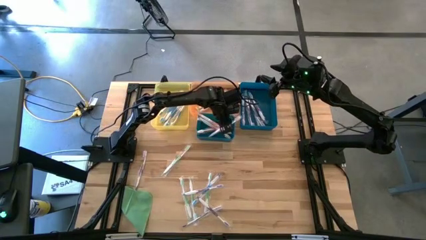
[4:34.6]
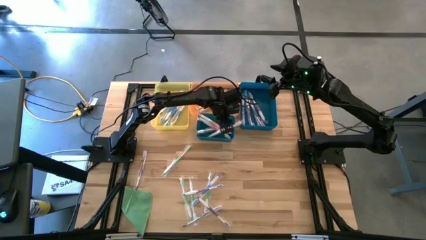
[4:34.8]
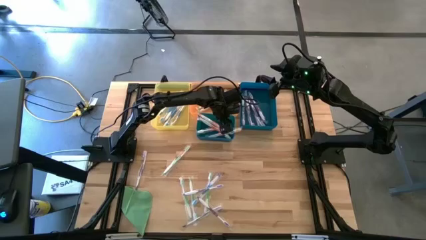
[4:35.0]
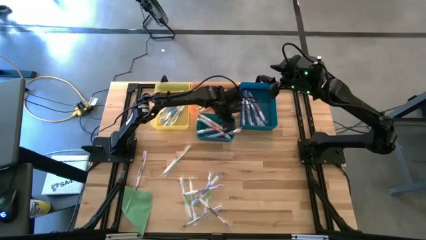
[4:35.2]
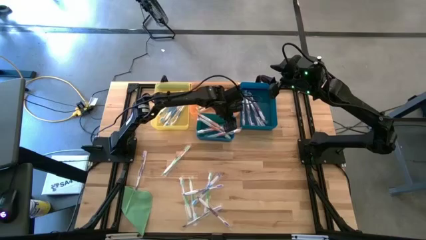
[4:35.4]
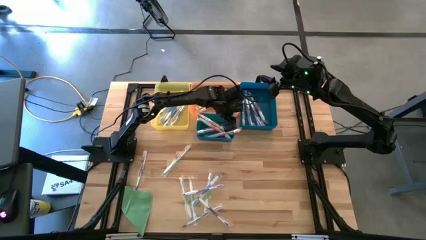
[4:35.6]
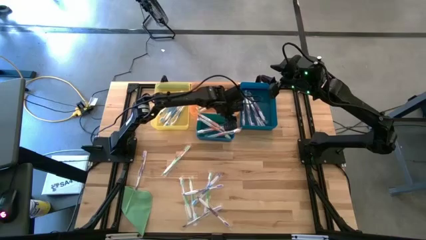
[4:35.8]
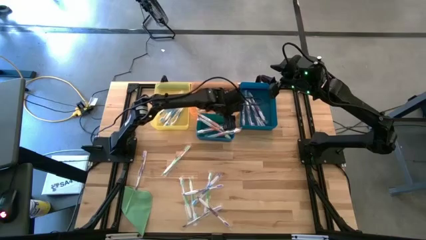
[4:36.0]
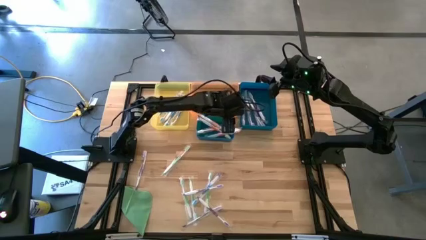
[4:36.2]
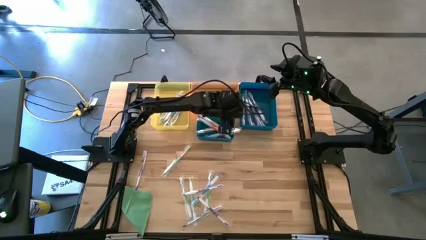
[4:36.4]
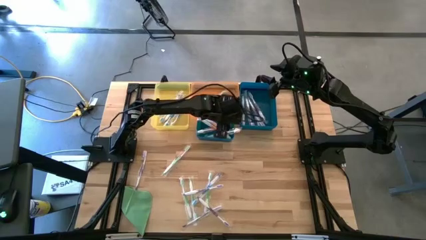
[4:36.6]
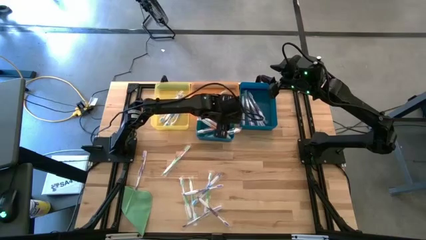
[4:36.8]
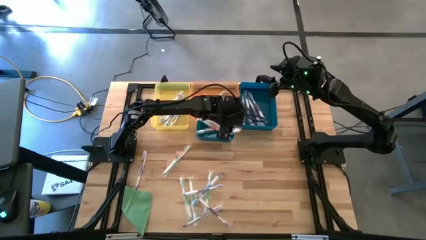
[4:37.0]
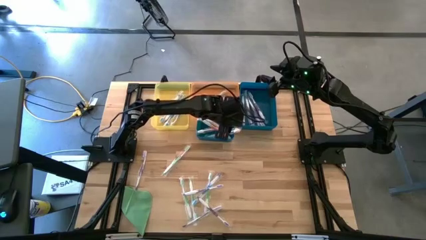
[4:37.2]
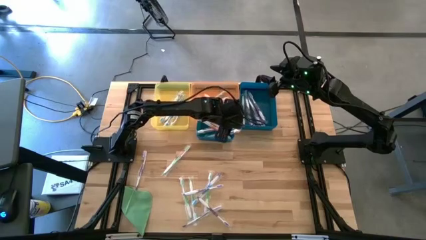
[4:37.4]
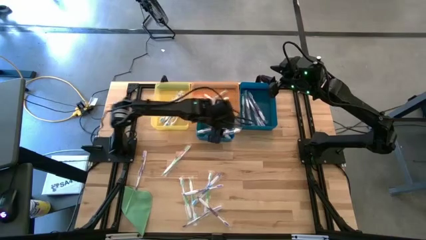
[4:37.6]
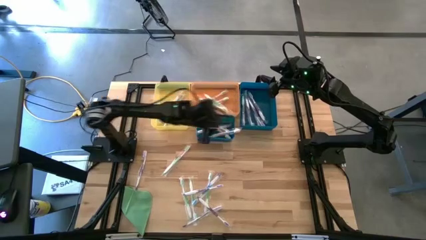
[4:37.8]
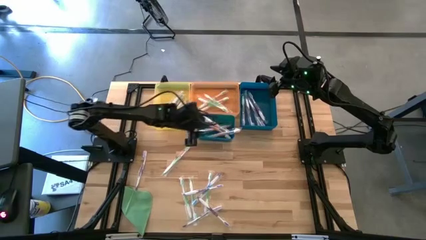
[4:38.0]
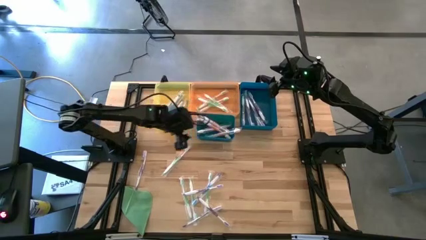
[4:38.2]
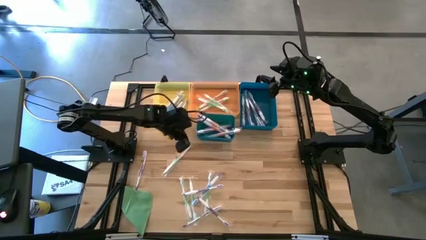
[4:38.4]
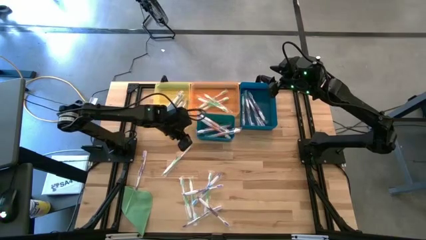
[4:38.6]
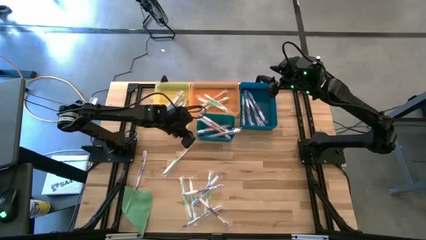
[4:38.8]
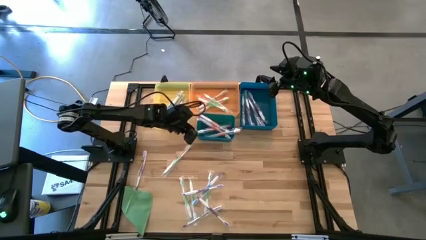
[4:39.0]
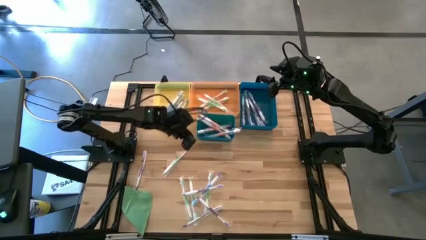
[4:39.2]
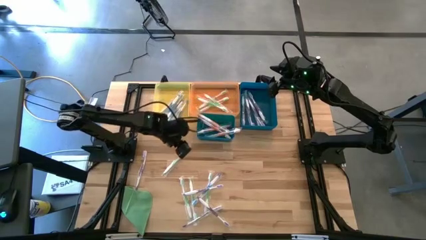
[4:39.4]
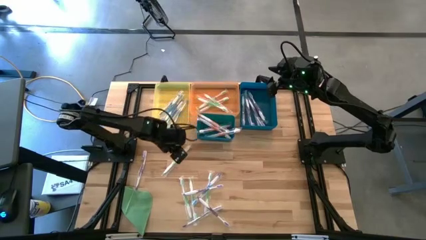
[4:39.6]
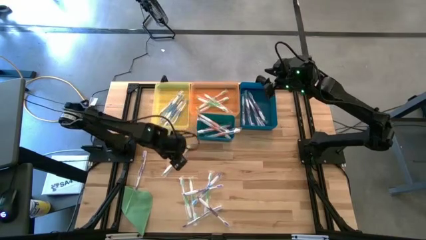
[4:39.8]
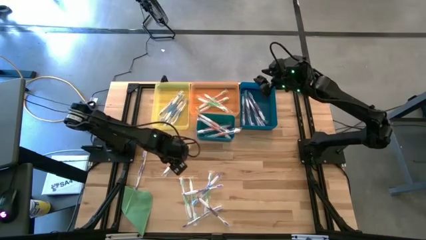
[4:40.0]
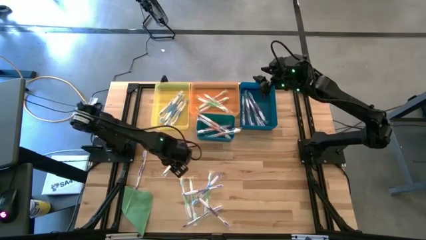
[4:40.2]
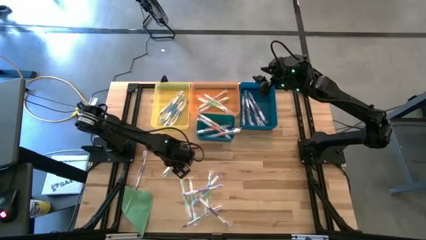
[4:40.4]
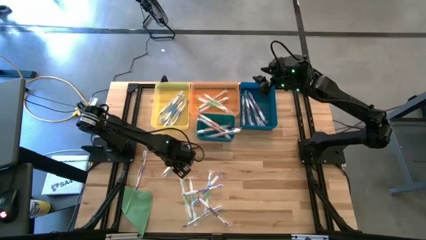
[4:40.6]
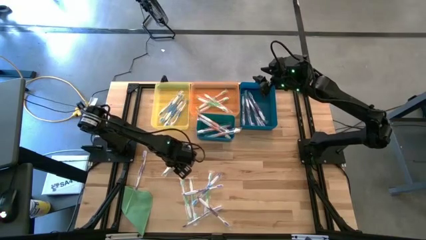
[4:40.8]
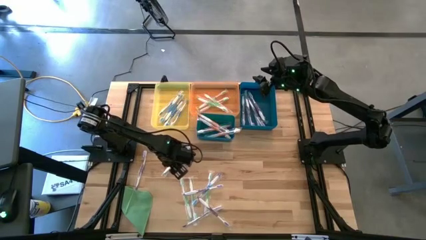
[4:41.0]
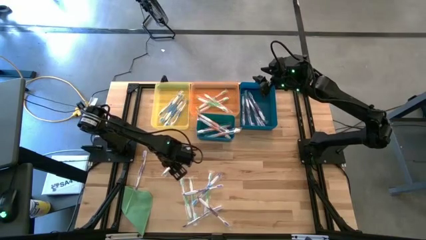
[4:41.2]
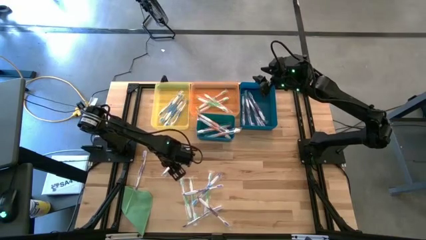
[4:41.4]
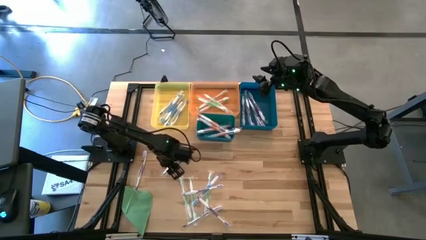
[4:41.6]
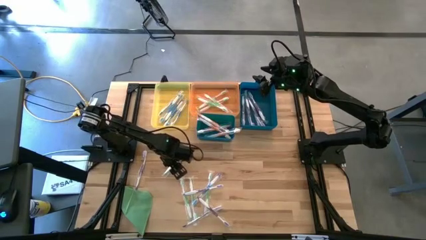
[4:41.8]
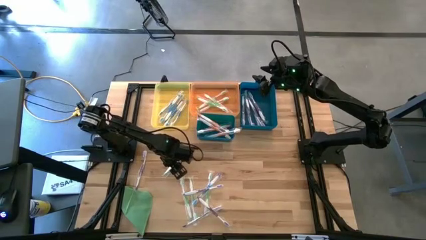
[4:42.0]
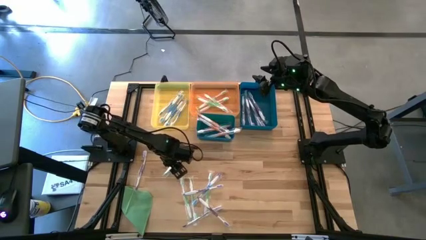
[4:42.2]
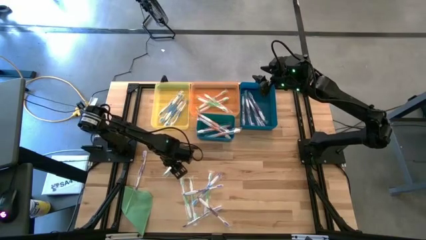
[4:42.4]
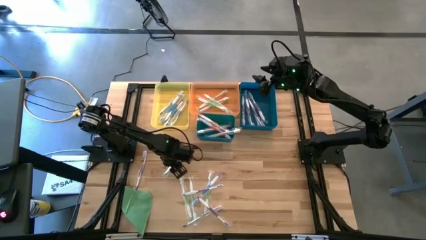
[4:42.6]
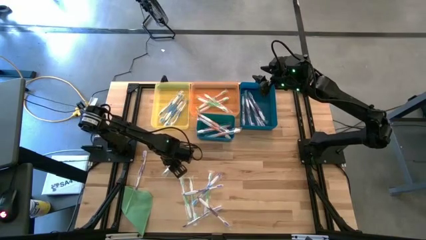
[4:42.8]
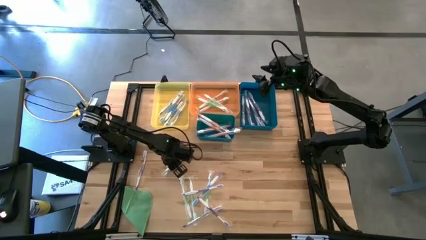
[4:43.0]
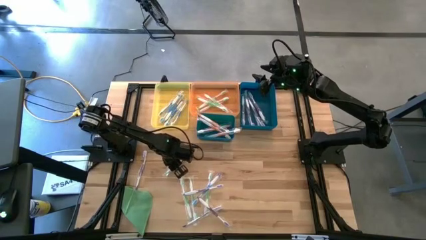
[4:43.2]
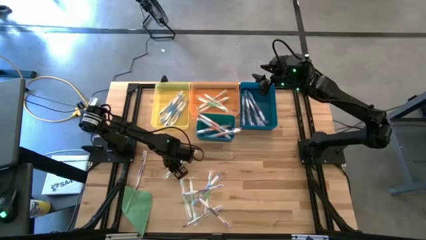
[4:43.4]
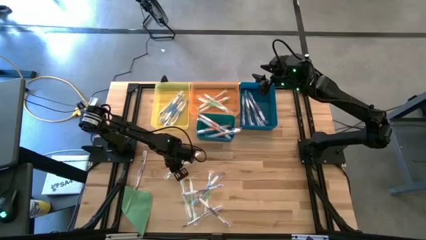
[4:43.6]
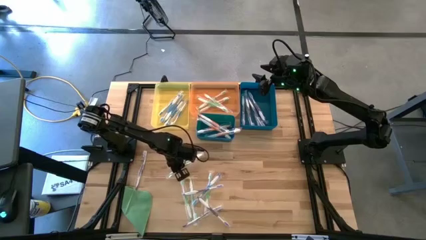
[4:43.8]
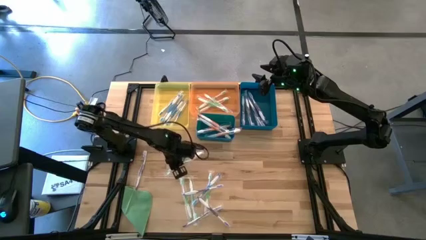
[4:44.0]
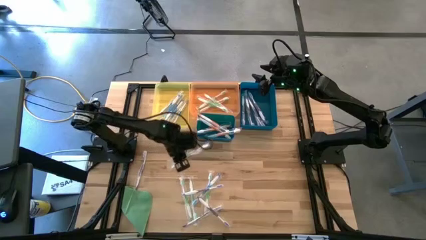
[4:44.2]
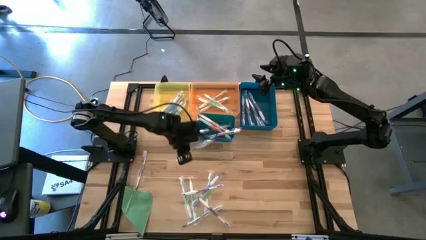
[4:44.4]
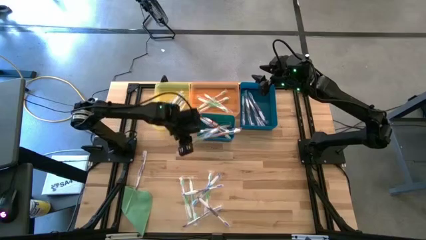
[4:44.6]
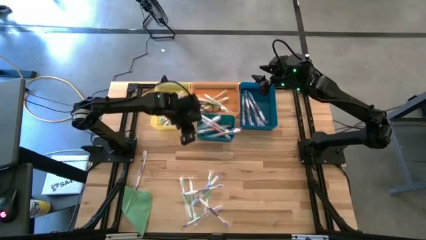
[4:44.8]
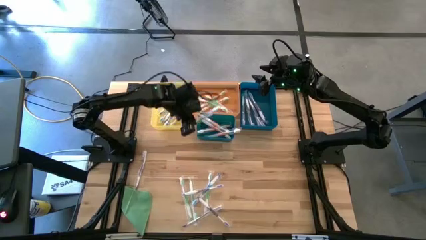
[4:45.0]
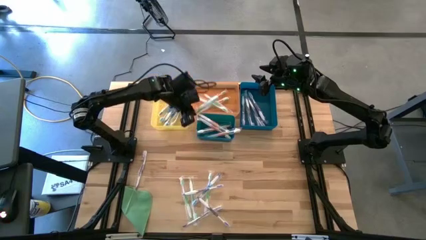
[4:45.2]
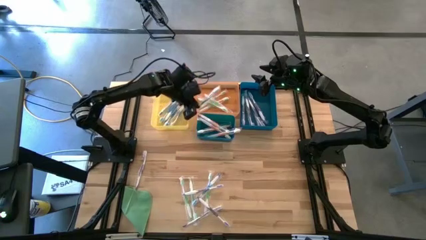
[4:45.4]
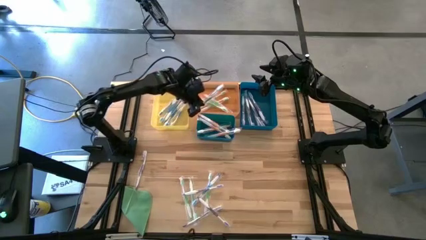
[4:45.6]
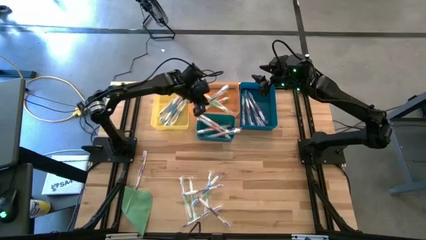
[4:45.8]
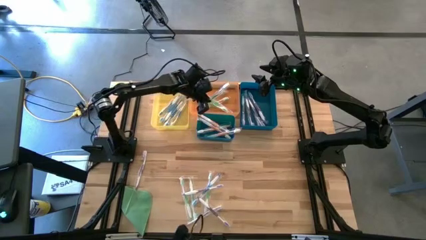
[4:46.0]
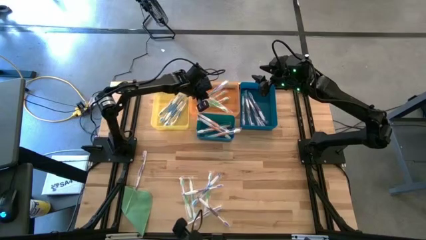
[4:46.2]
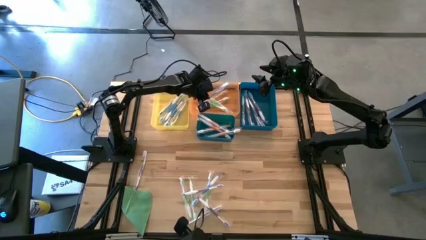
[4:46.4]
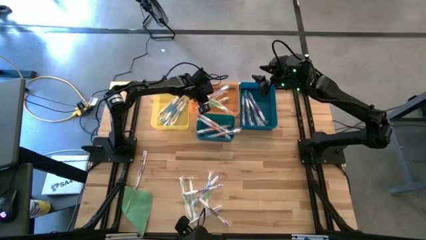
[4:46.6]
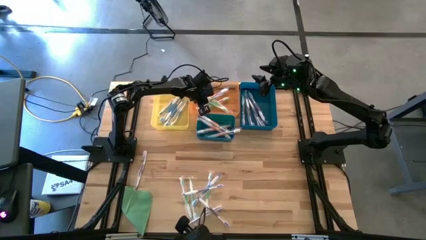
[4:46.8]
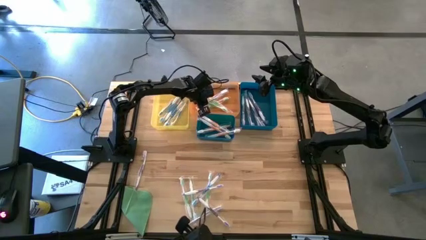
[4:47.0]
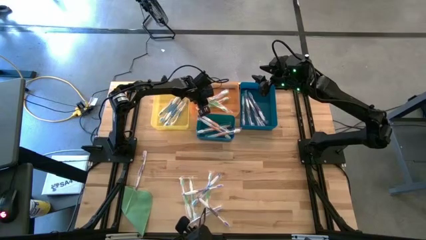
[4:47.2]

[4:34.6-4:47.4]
Task: Pick & Place Toothbrushes
Put the green toothbrush into the orange bin
